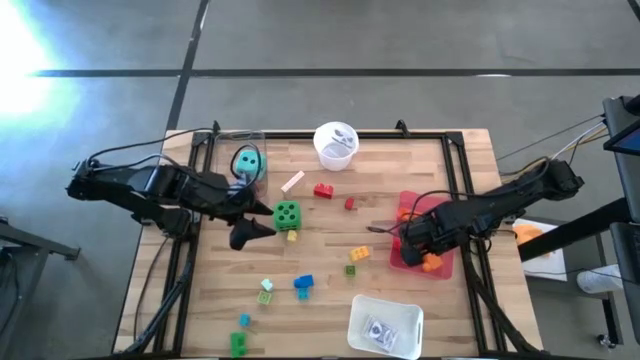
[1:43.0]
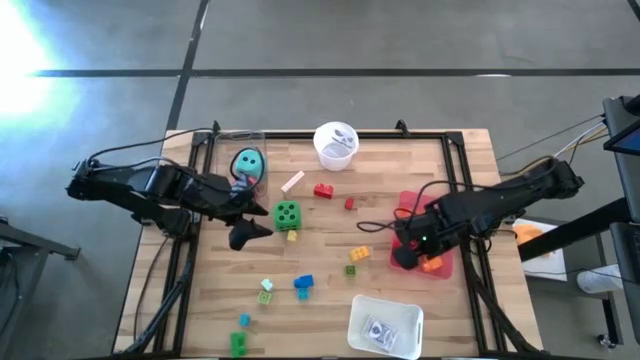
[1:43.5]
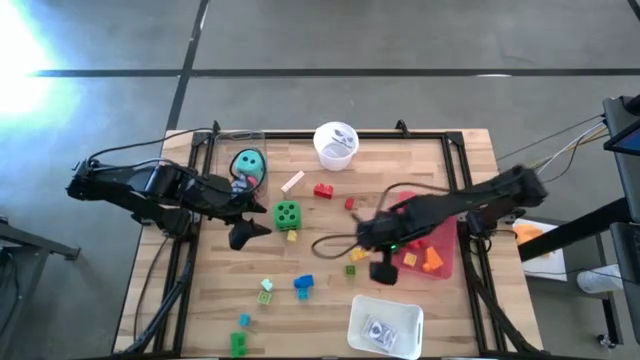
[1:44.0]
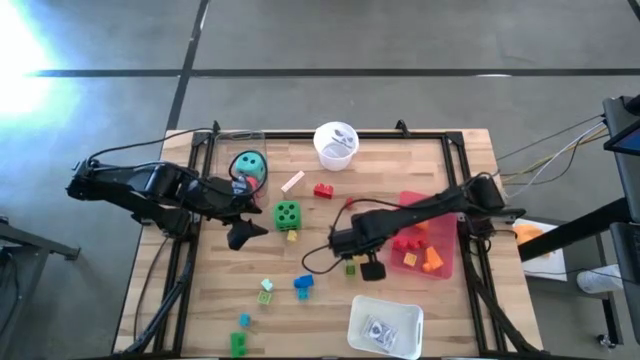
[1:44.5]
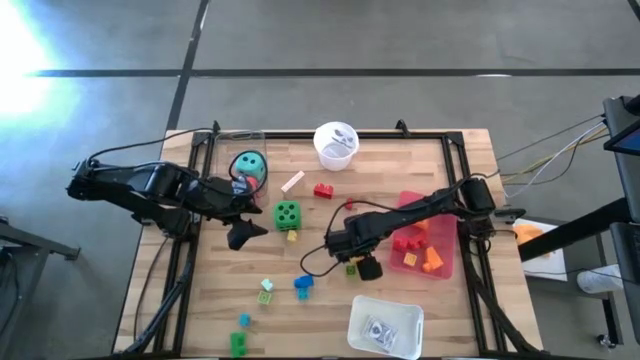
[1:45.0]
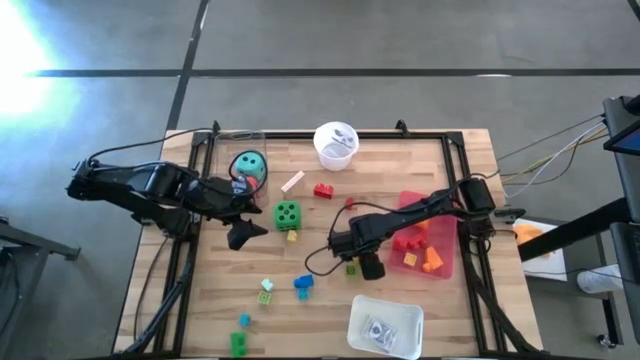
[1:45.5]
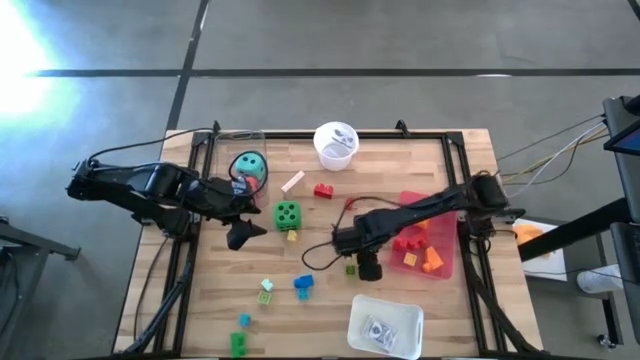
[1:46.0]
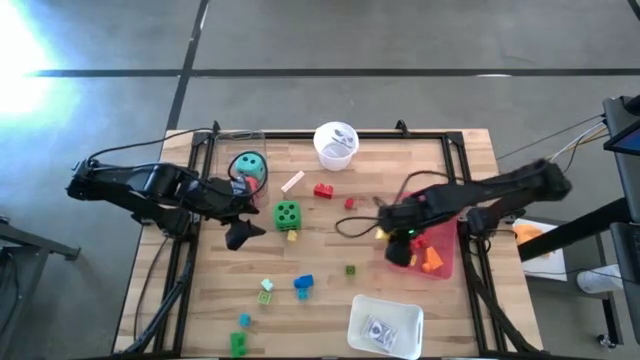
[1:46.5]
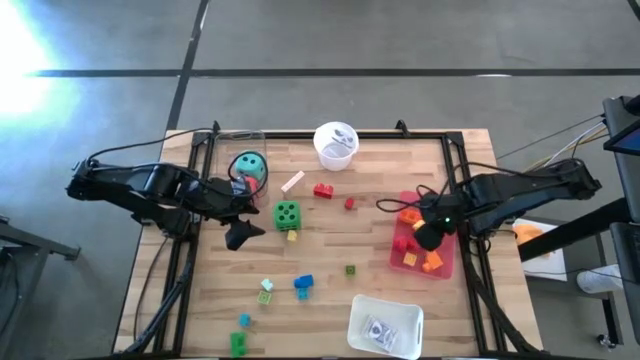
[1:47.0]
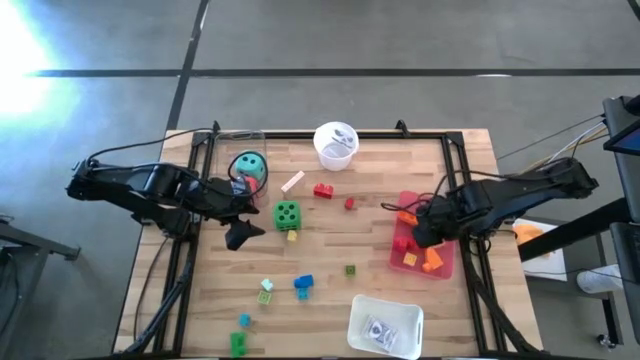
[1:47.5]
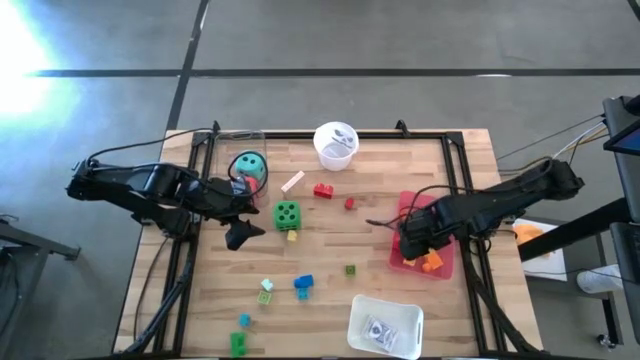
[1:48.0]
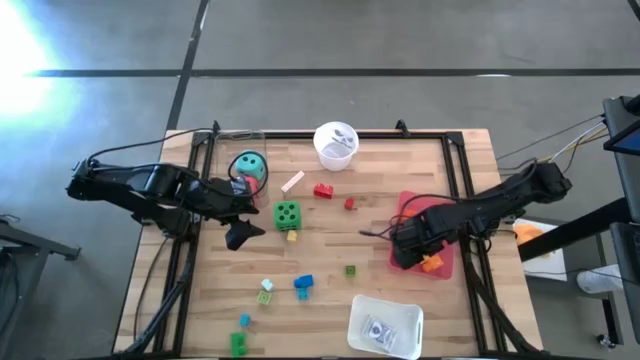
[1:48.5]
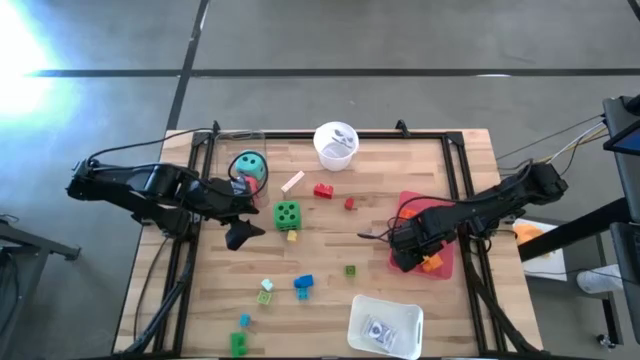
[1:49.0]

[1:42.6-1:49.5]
Task: Pick & Place Toys
Put the yellow game piece into the pink bin

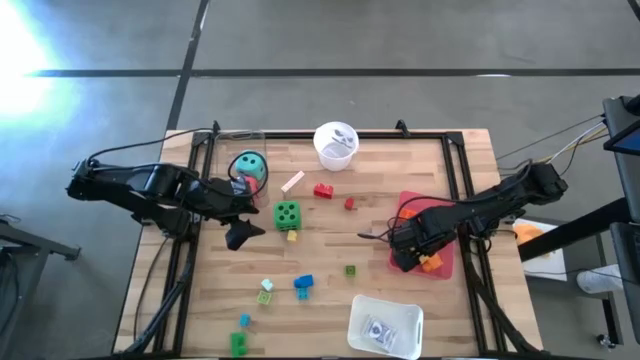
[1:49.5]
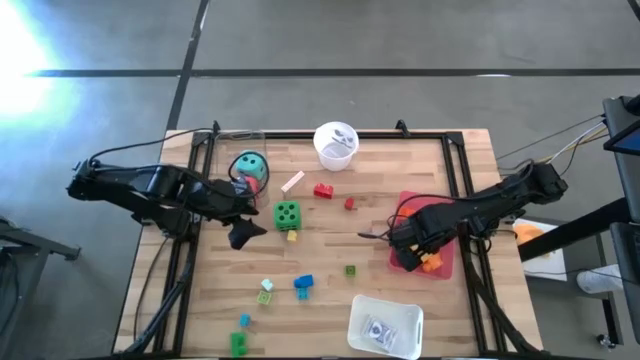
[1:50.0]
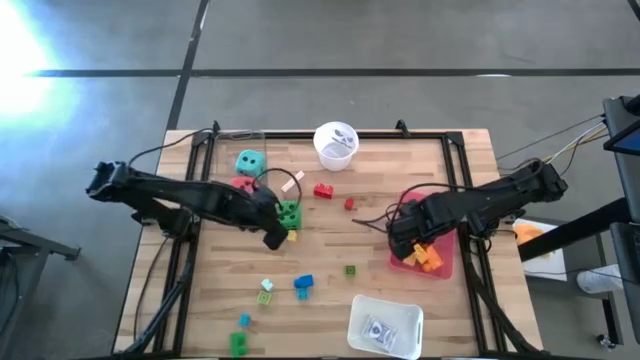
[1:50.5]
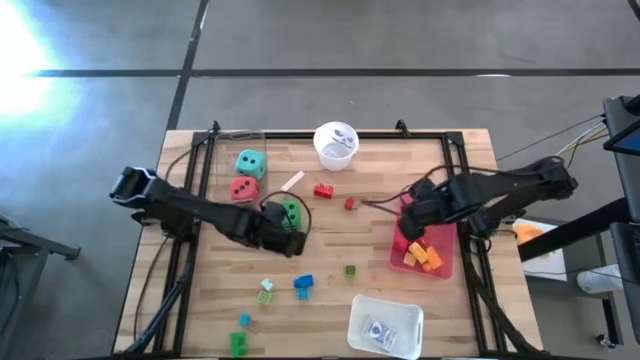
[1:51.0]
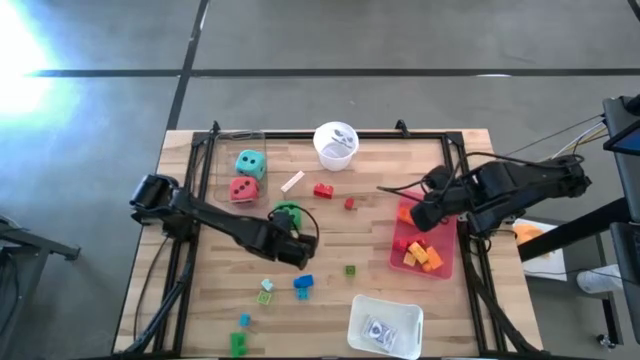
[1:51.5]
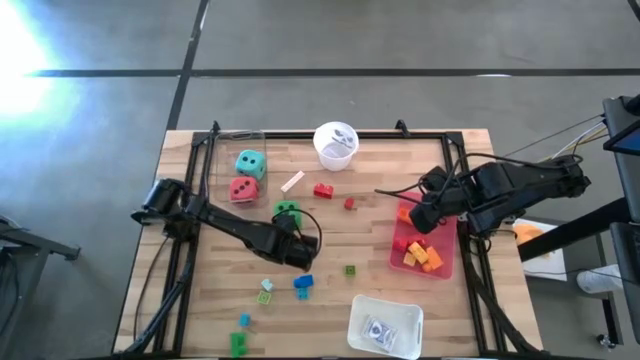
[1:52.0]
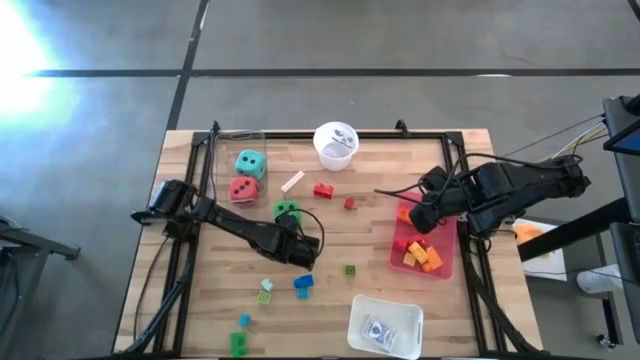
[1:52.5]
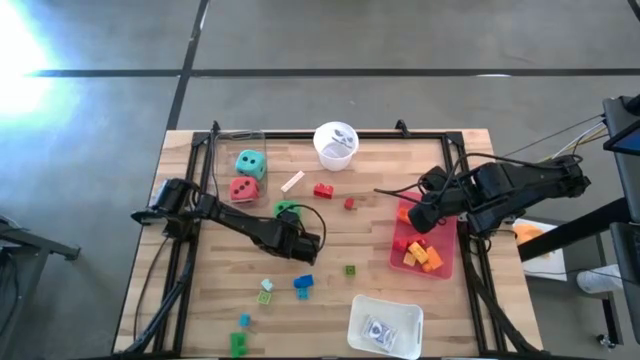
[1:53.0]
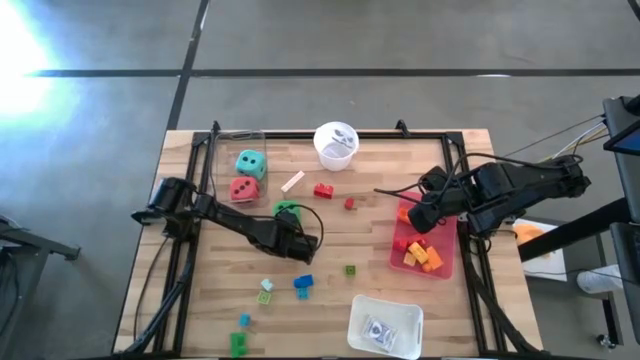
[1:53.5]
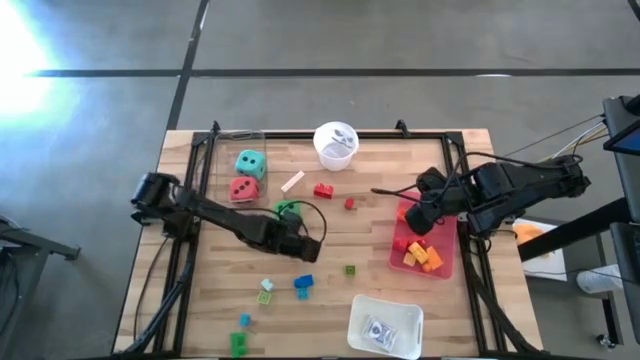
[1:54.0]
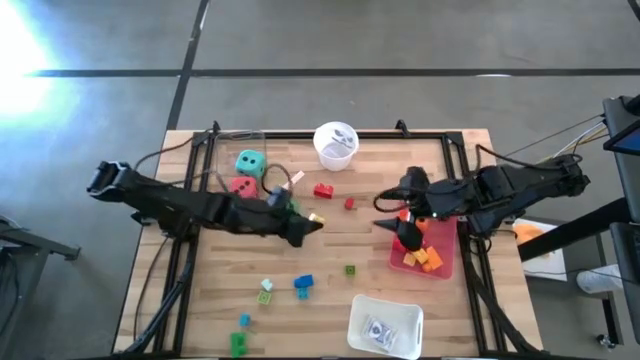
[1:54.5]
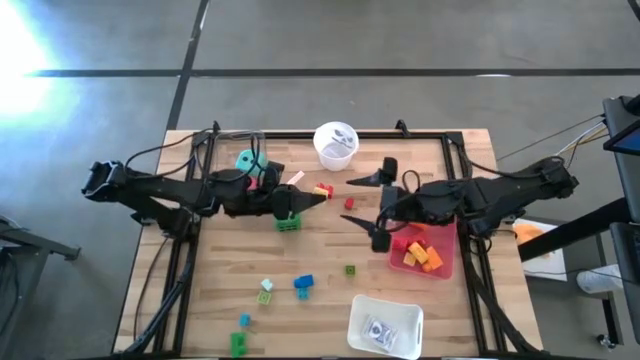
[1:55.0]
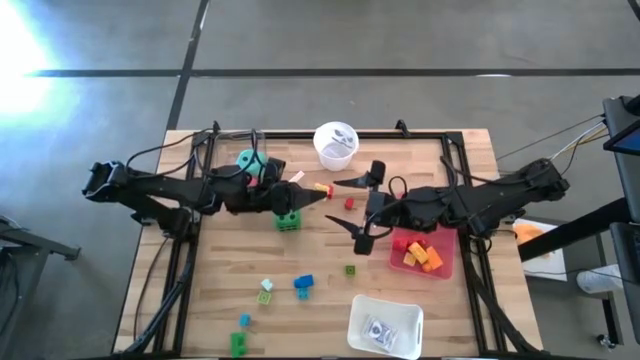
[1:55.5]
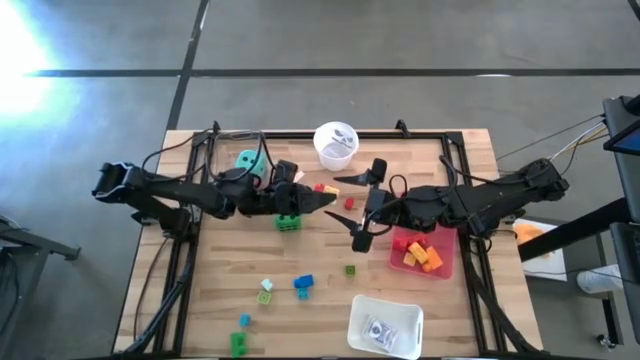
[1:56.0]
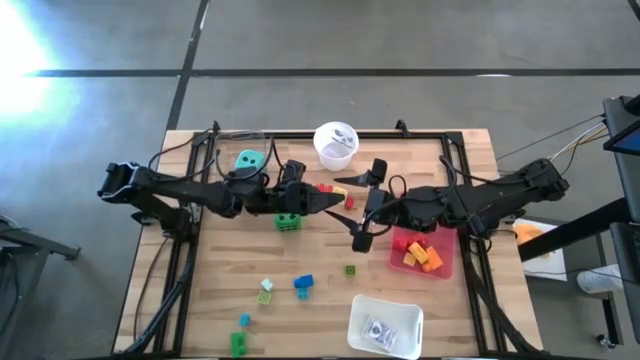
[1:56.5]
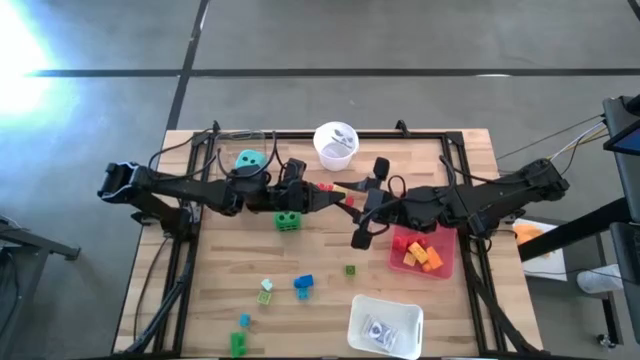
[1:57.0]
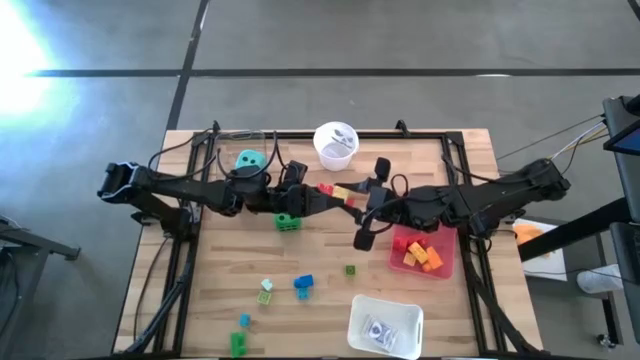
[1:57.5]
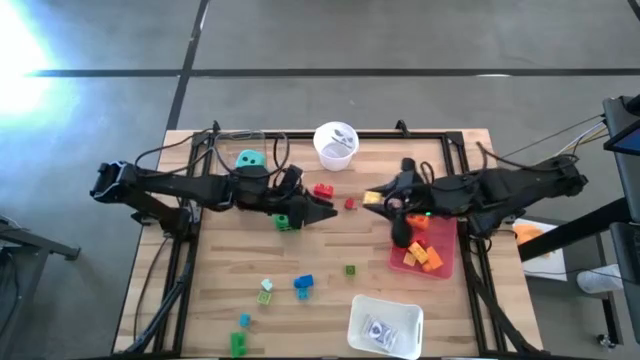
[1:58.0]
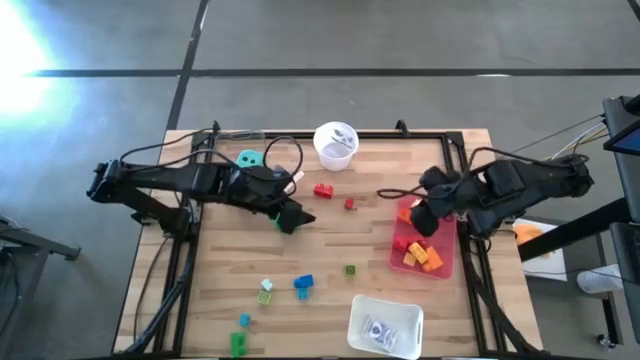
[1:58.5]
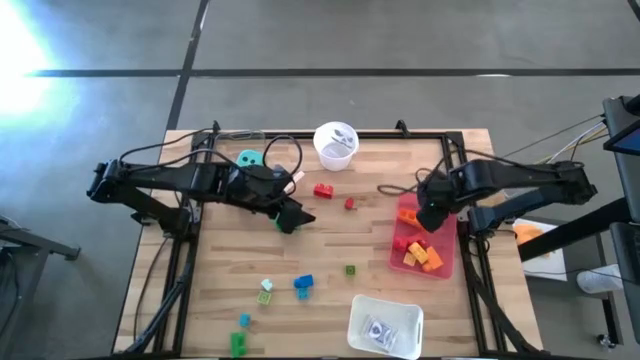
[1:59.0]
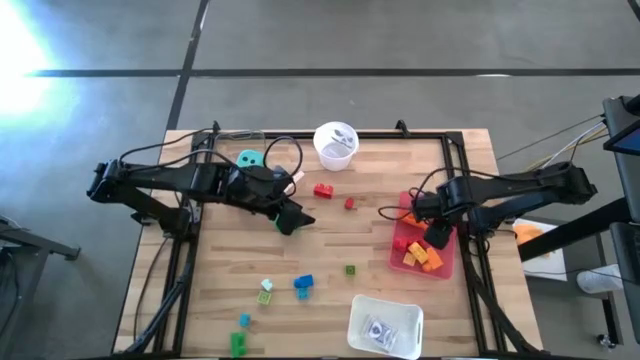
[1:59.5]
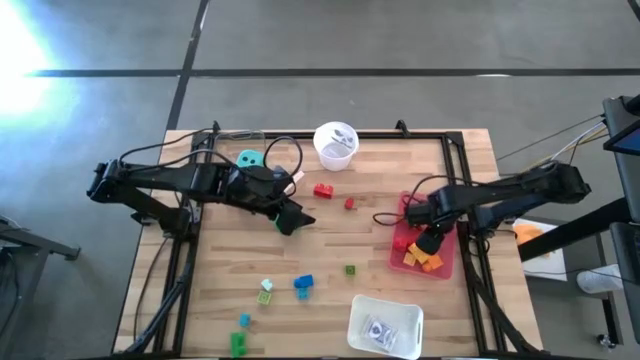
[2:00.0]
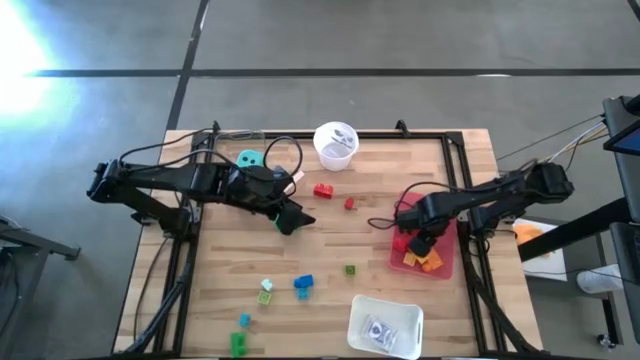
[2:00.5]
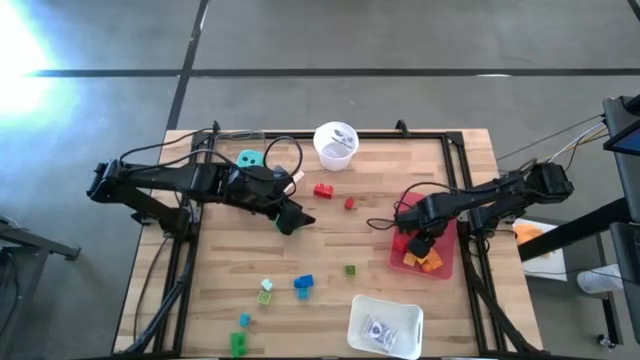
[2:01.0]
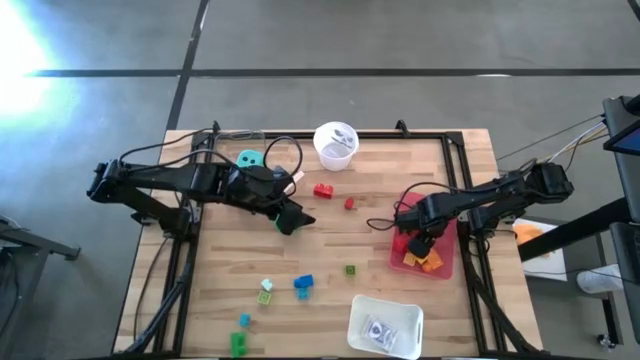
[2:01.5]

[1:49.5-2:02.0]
Put the yellow game piece into the pink bin

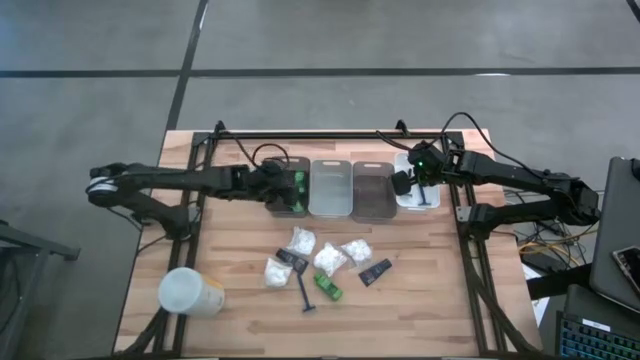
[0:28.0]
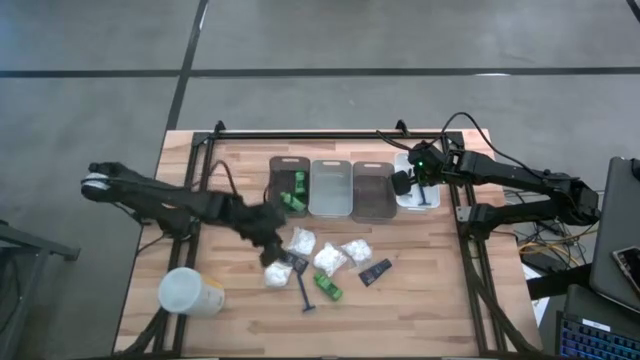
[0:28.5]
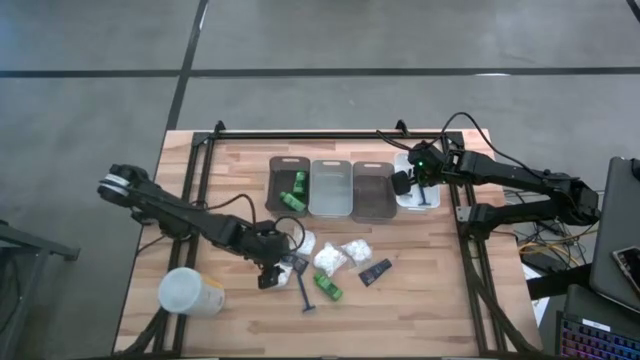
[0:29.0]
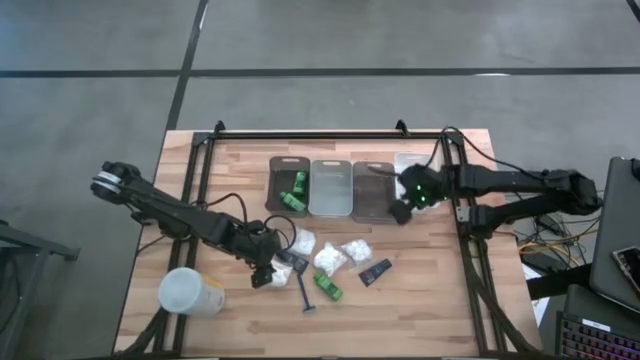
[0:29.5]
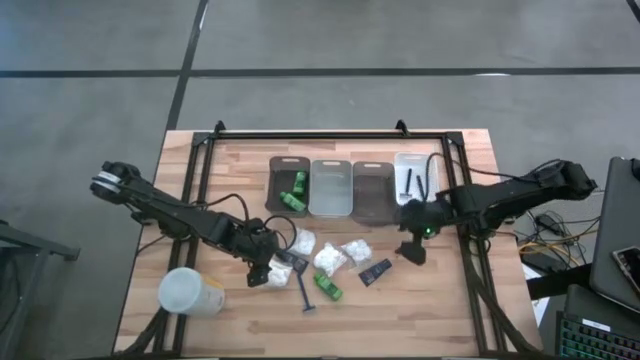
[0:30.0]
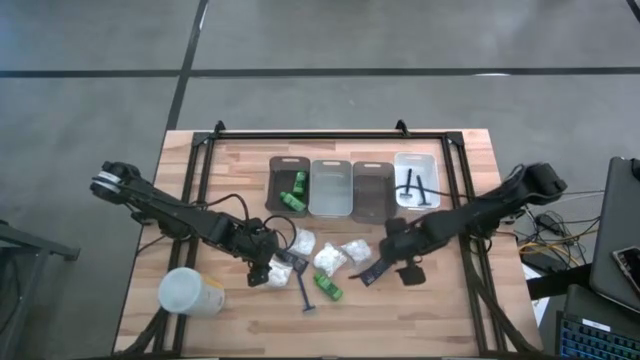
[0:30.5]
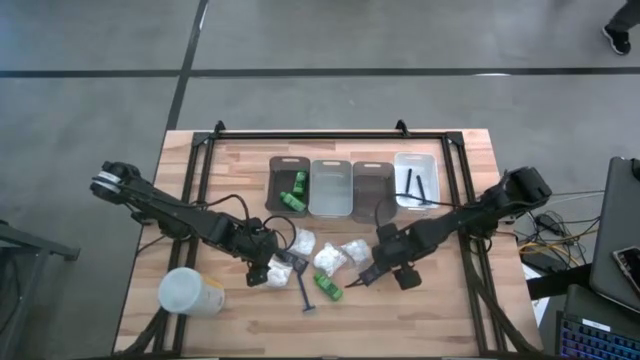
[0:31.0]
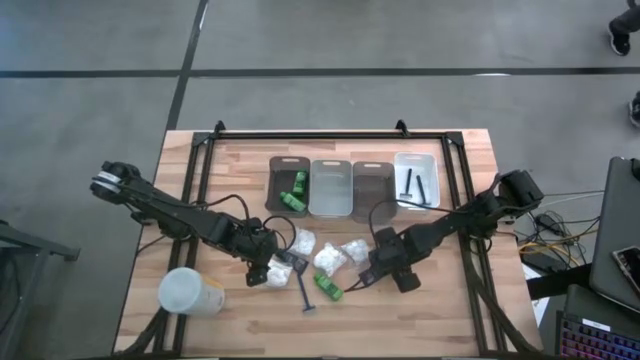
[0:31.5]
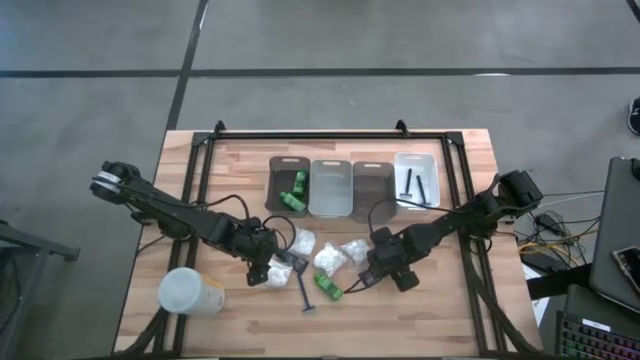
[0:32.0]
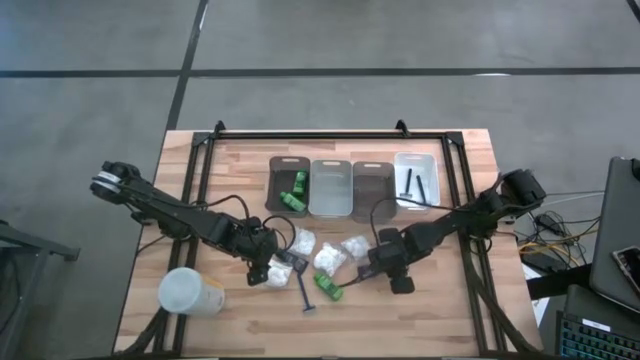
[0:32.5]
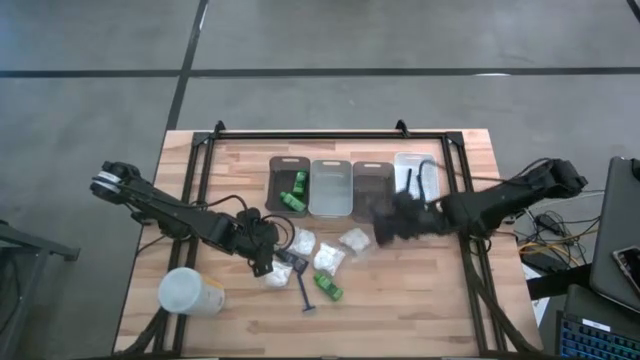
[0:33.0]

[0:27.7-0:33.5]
Task: Pick & Place Travel size toiletries
Put the right blue shave cream into the right black bin
